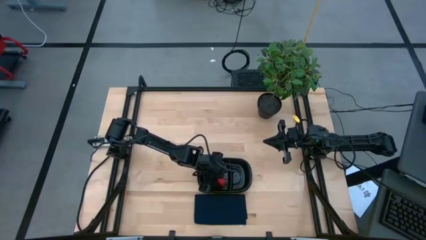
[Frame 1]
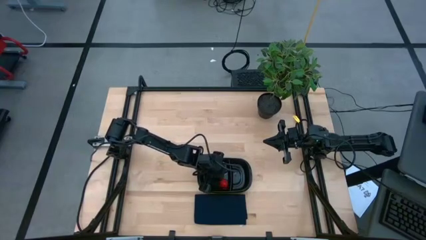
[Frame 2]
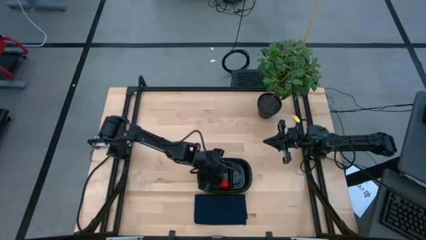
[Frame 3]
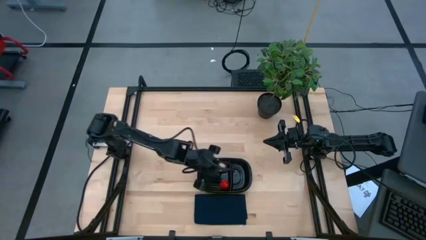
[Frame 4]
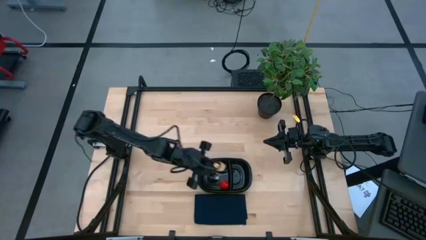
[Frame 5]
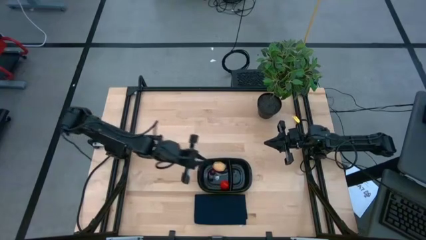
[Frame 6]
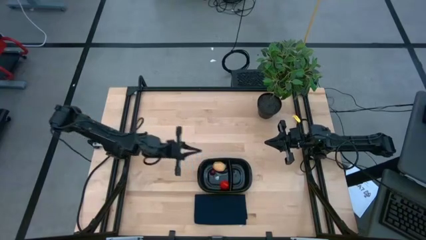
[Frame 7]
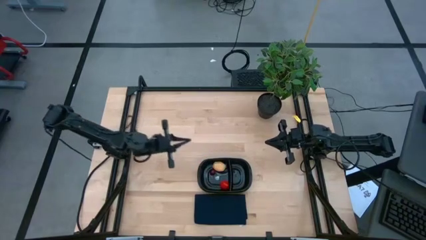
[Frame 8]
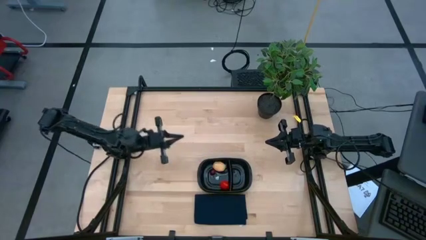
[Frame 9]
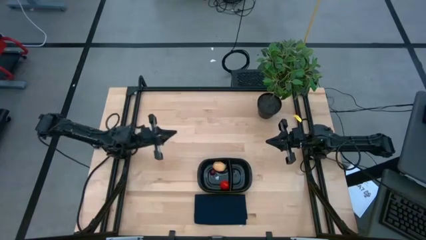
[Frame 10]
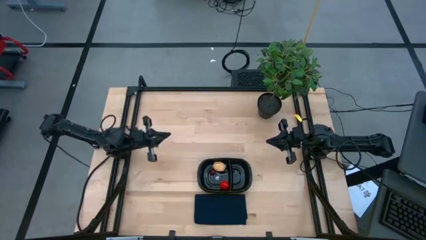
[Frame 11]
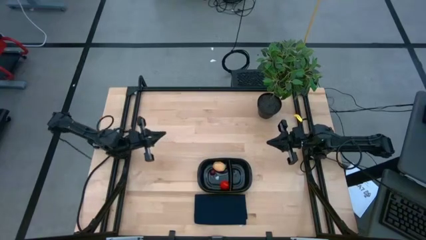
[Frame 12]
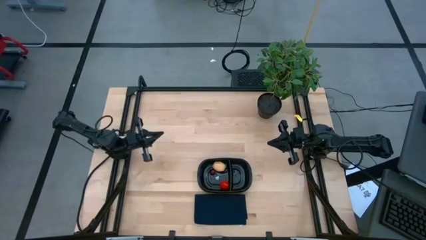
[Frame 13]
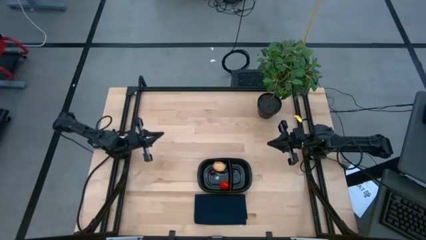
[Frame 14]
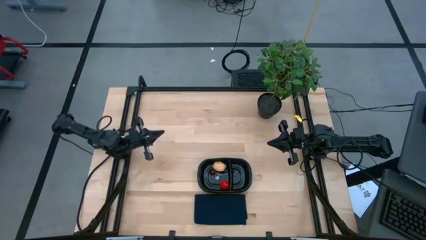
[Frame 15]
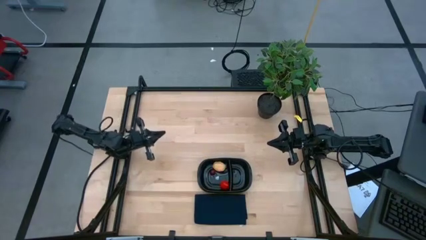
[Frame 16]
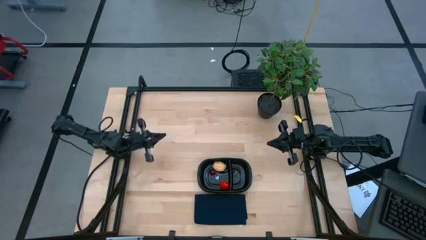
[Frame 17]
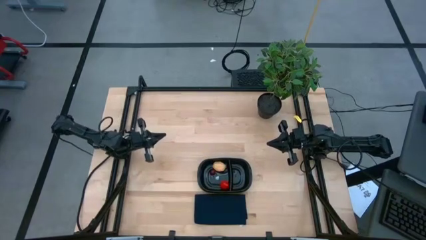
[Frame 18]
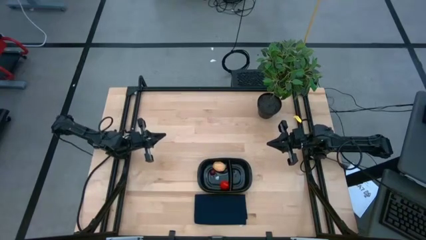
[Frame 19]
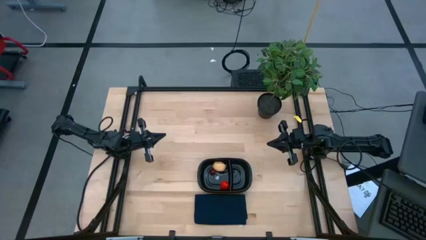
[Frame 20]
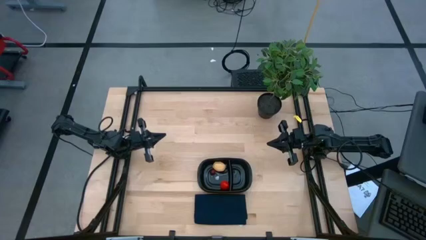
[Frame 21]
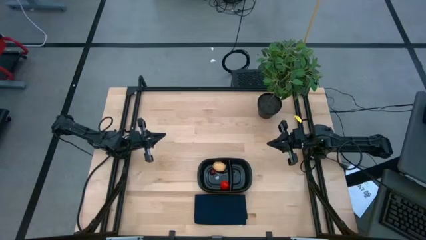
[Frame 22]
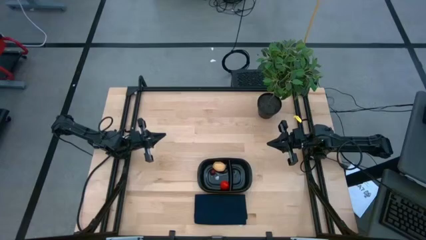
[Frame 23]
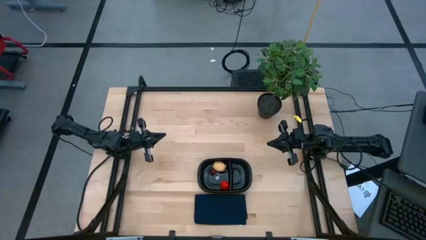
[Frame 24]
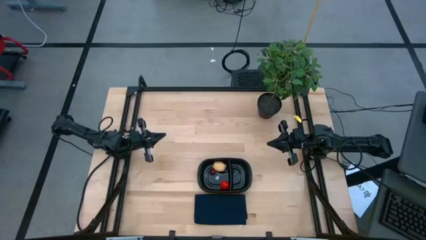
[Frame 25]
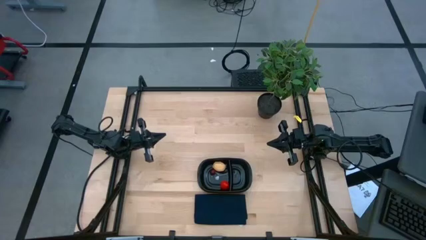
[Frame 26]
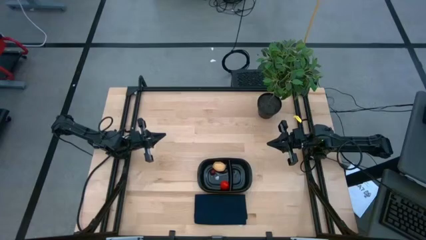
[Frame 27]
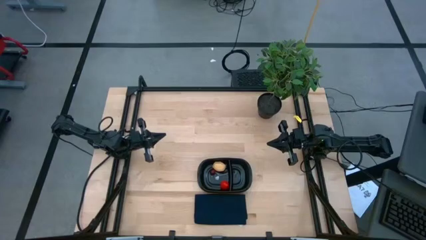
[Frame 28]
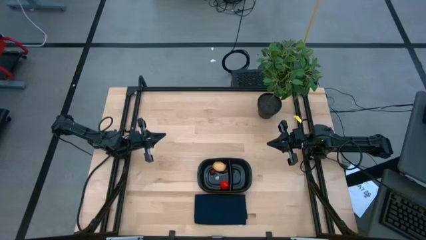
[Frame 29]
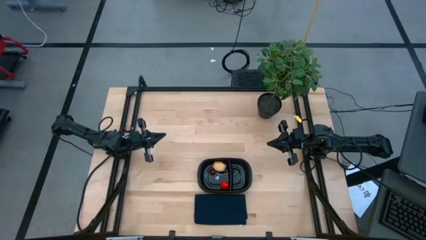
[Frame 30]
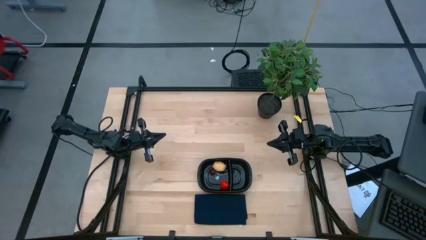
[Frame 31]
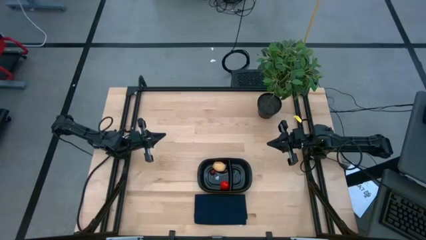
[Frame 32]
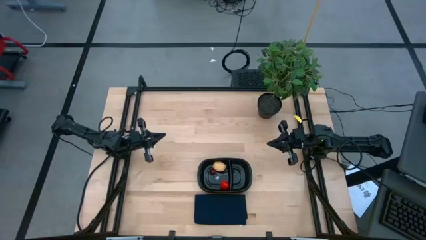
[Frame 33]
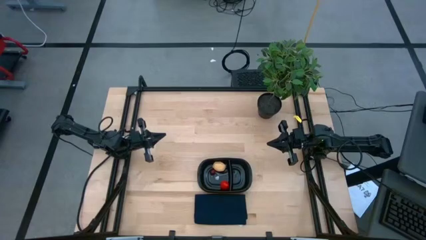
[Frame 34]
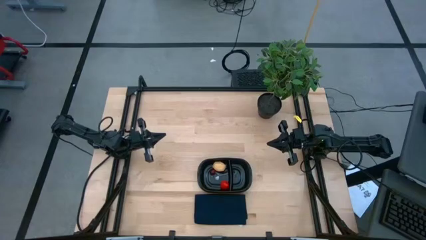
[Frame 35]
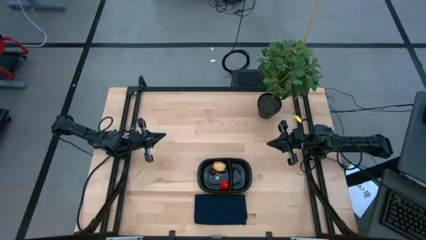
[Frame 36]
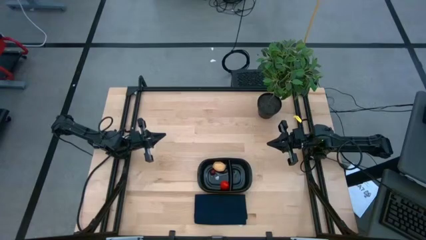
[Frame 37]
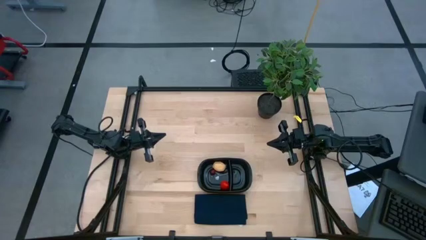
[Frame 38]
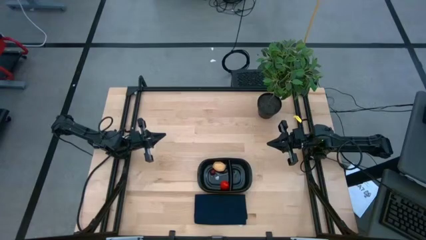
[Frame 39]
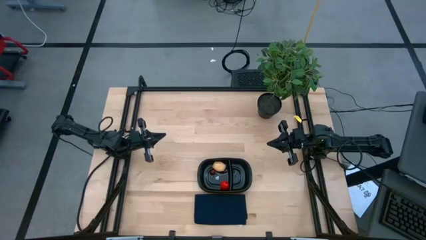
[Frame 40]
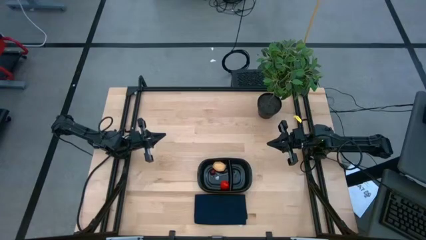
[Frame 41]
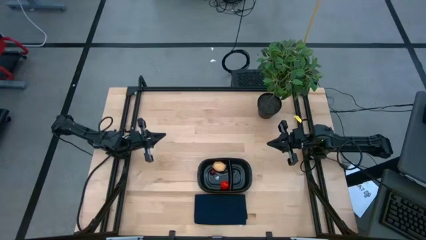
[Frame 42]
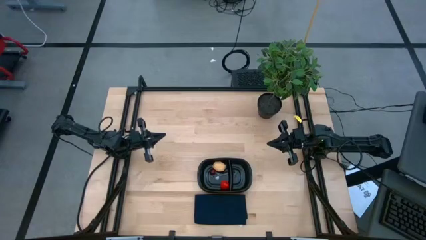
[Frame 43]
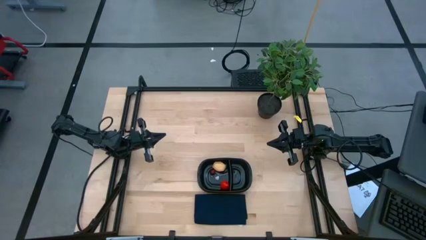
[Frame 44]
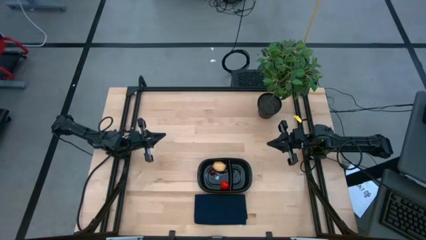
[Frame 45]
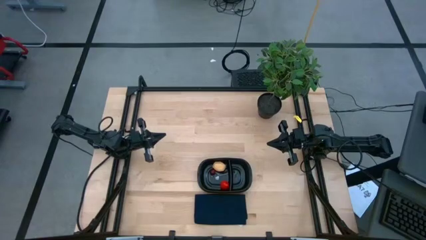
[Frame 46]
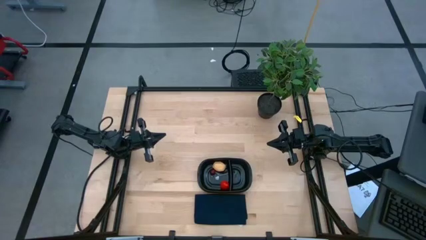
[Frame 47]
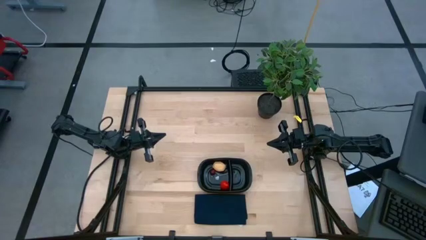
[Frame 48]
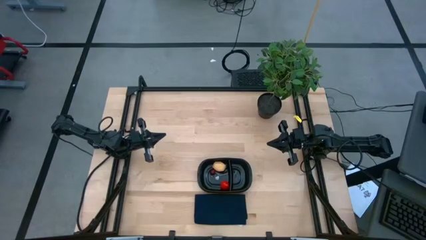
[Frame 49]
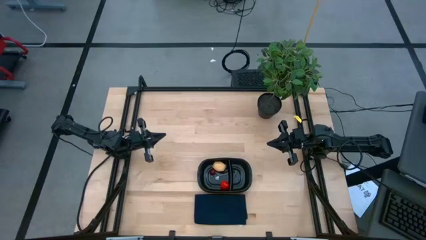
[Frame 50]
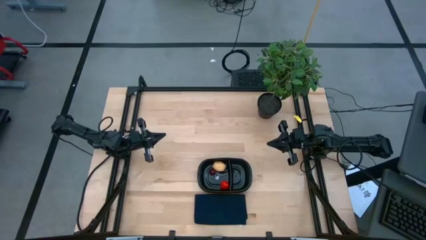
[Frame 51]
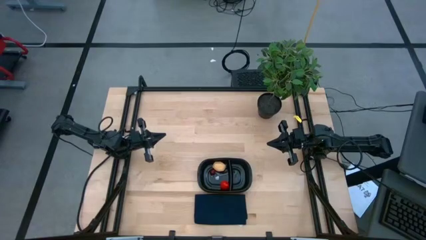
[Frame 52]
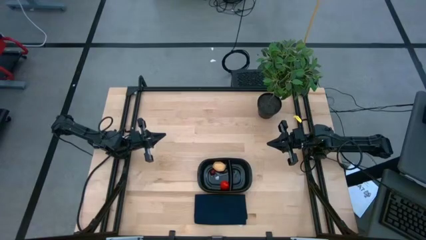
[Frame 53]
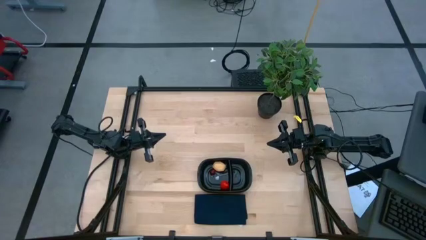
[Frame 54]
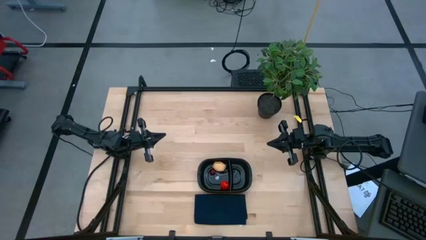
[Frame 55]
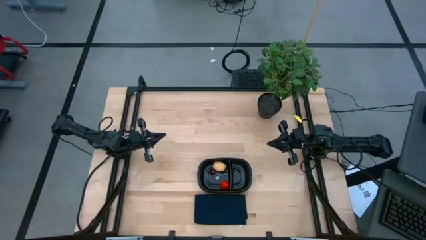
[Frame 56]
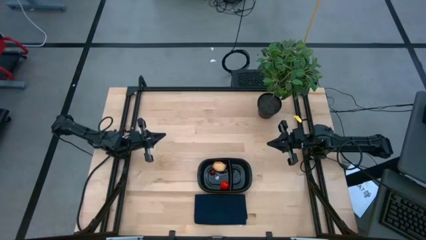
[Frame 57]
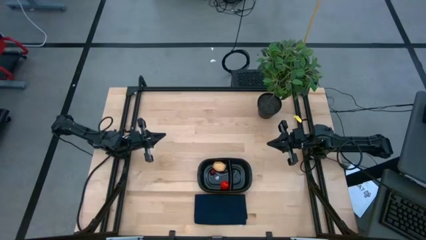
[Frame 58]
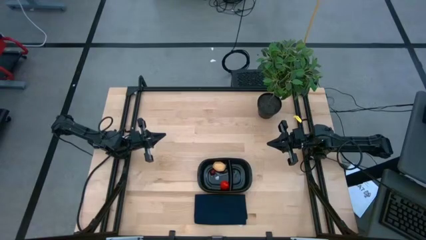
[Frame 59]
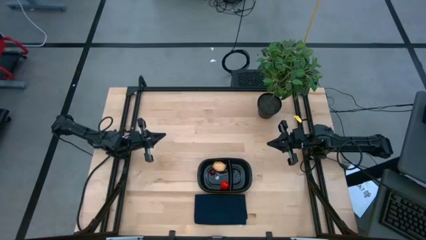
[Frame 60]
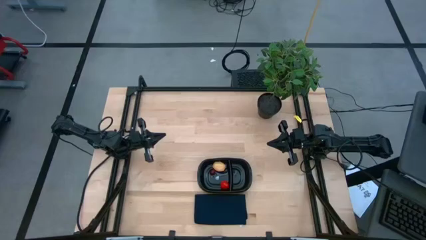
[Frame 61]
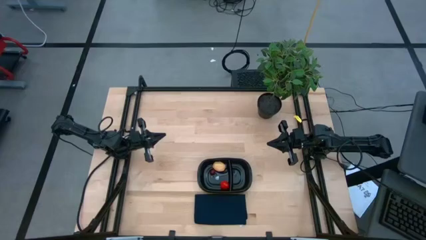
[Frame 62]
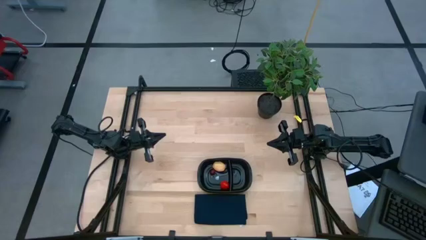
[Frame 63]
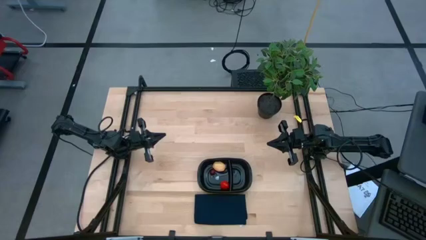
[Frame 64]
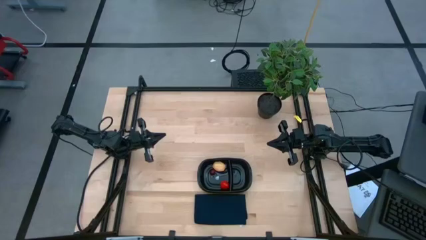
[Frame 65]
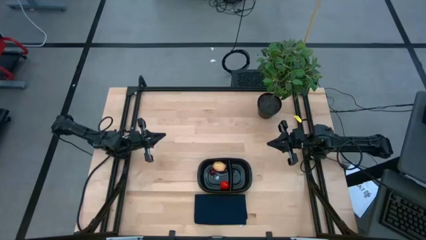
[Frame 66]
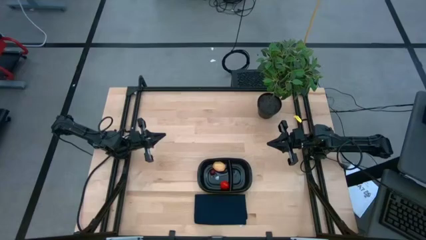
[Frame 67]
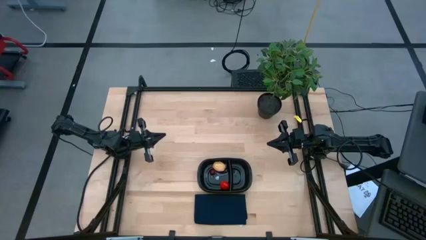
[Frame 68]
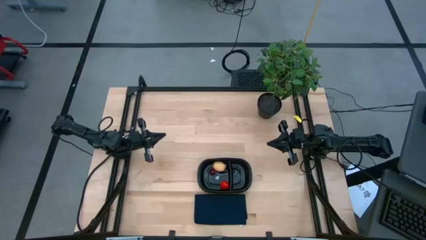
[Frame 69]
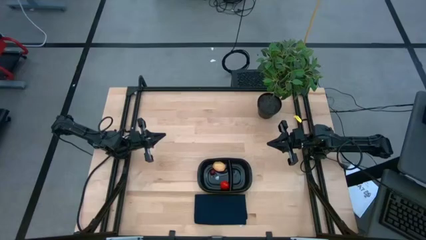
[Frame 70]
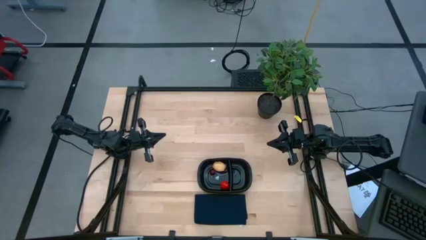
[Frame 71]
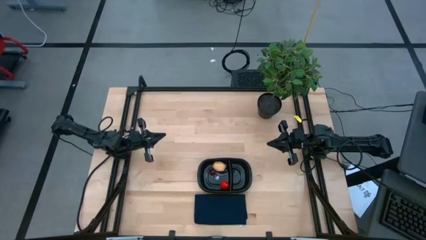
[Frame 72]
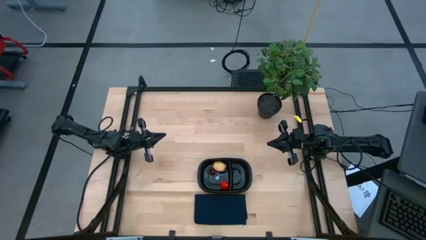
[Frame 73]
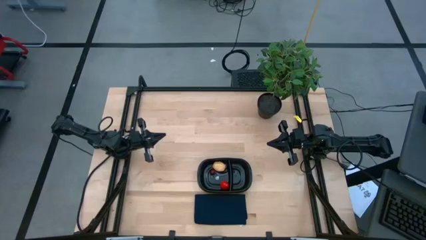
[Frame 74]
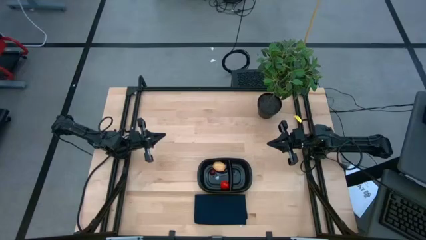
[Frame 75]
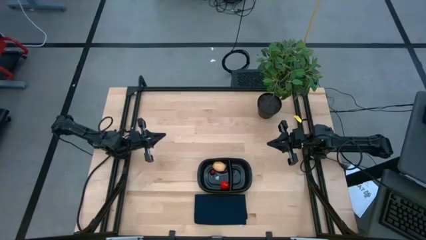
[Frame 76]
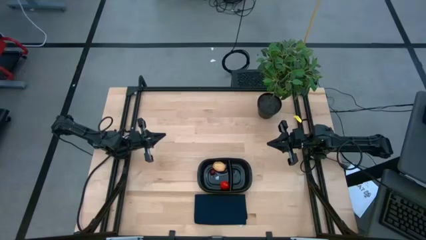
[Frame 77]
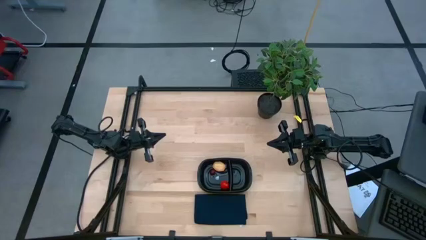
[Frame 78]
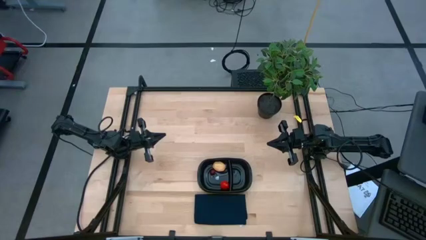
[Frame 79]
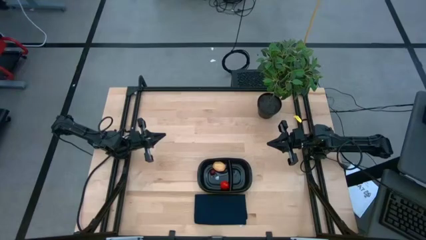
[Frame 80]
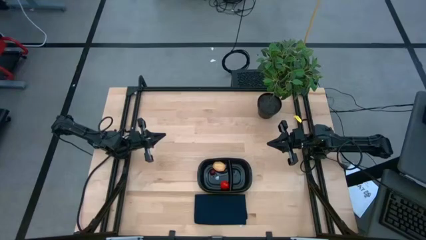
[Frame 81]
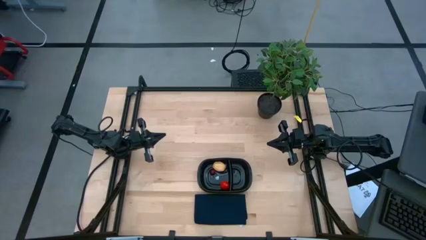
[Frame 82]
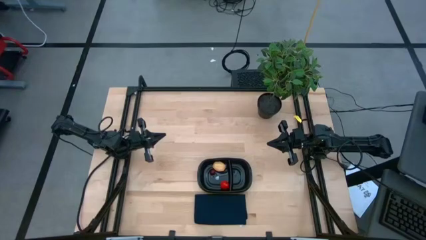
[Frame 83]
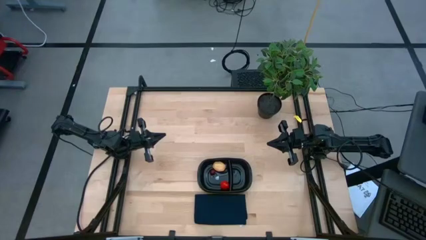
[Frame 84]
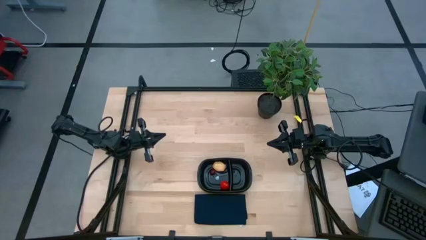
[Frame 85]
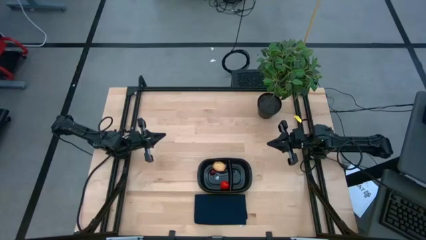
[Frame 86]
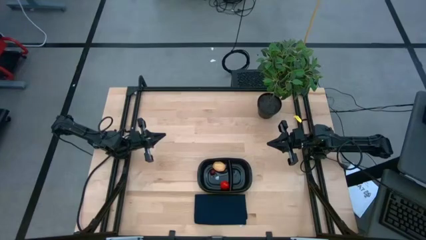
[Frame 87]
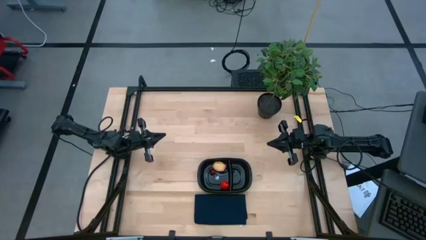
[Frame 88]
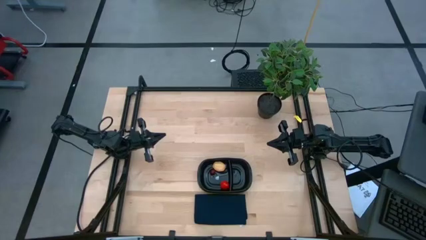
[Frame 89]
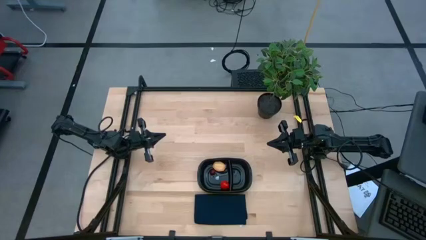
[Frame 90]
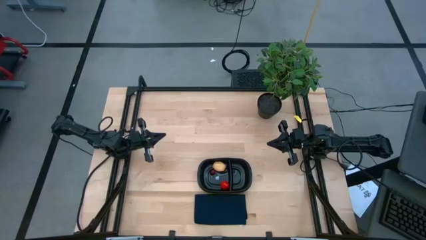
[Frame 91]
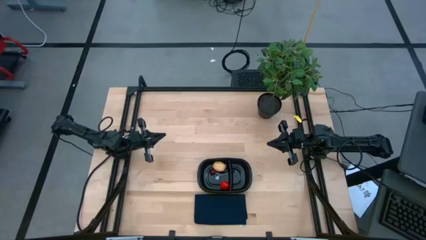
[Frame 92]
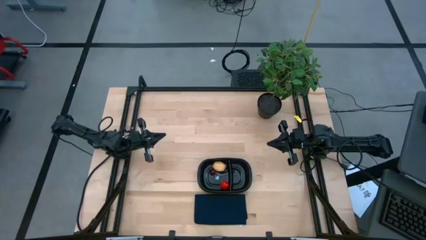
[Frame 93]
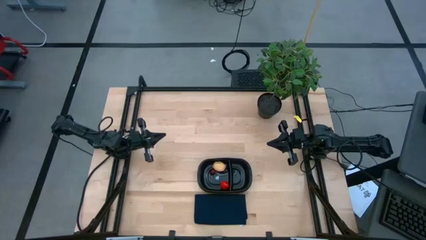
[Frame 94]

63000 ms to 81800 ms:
Task: Pick and placing Produce into tupperware
Return to Home Position
